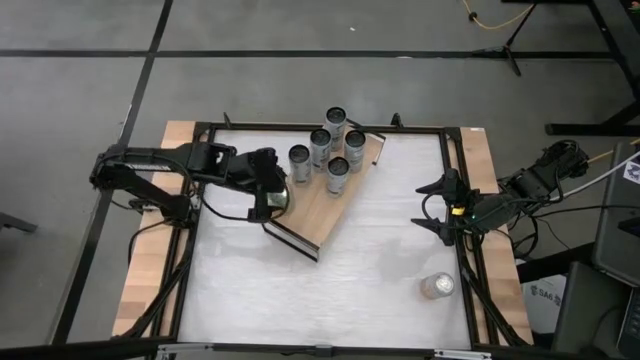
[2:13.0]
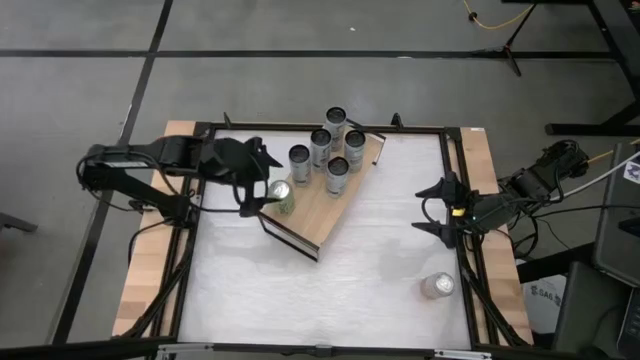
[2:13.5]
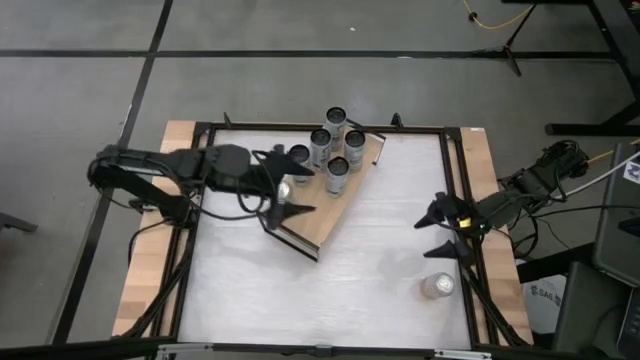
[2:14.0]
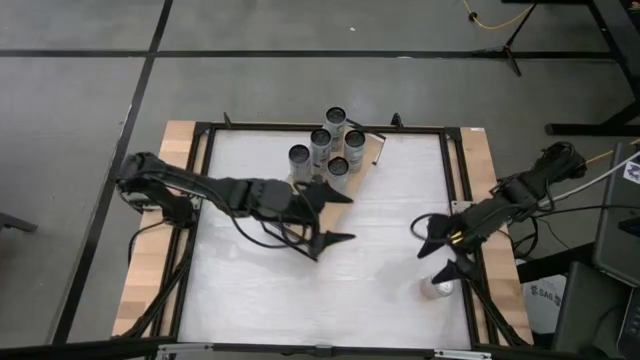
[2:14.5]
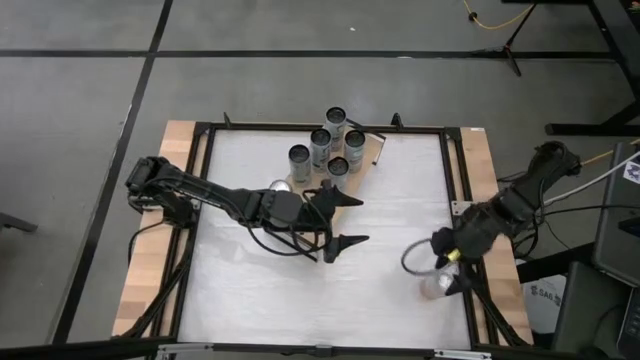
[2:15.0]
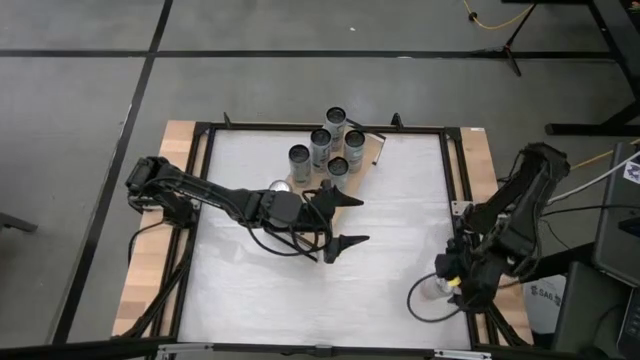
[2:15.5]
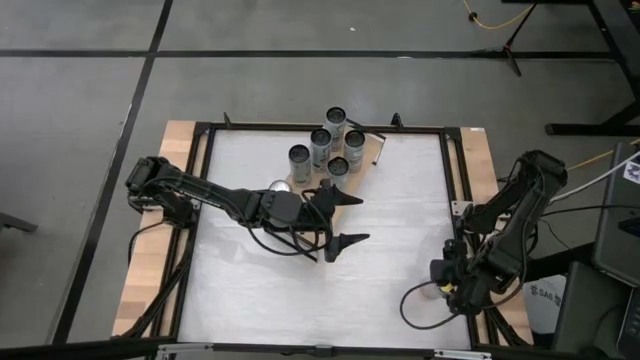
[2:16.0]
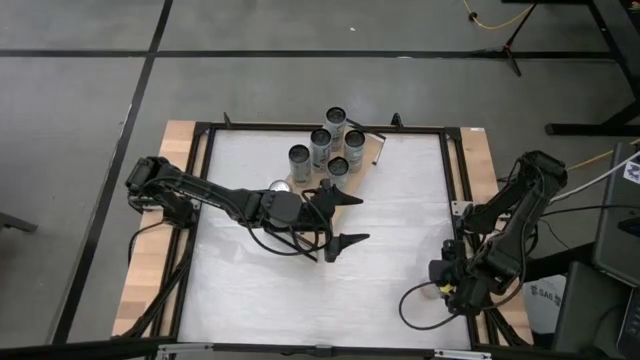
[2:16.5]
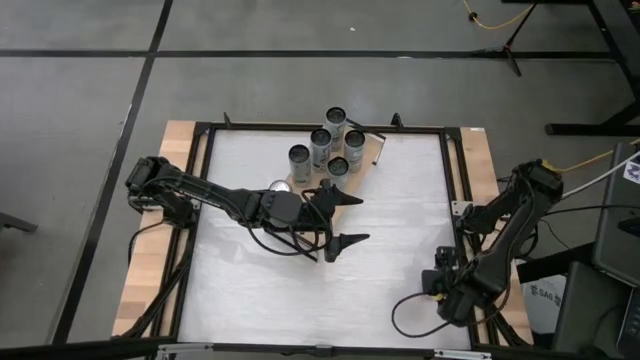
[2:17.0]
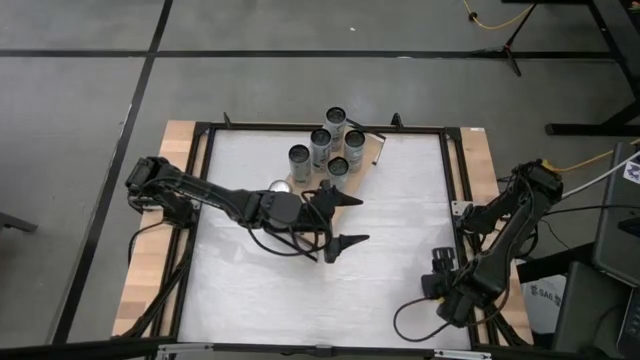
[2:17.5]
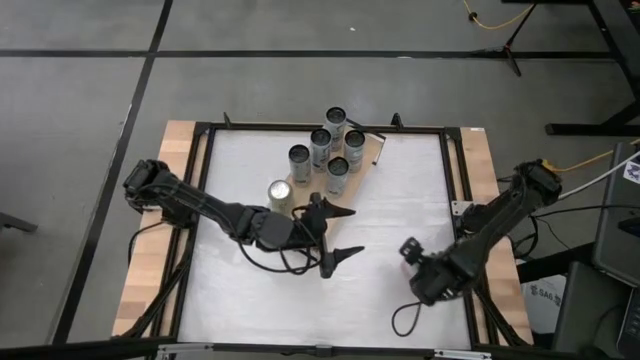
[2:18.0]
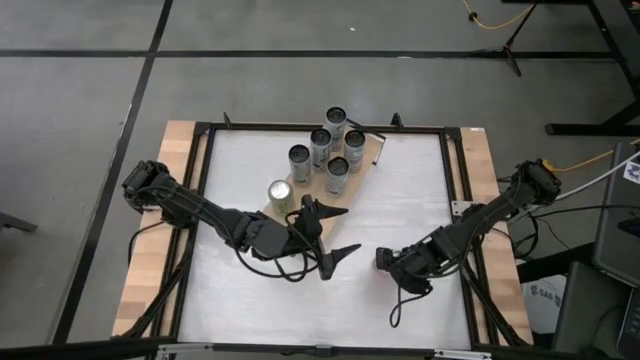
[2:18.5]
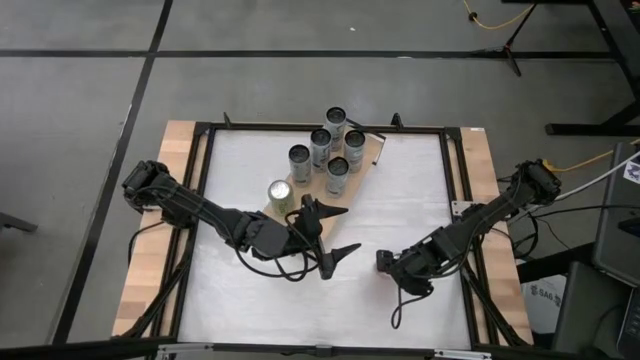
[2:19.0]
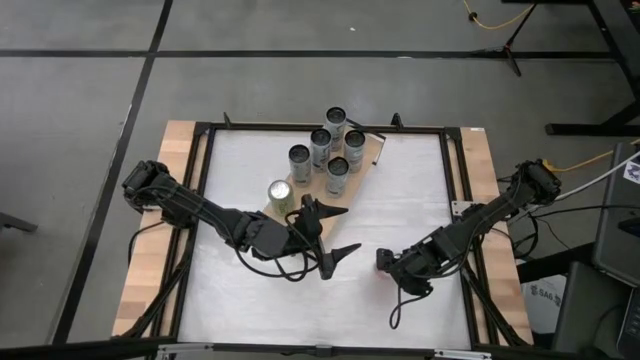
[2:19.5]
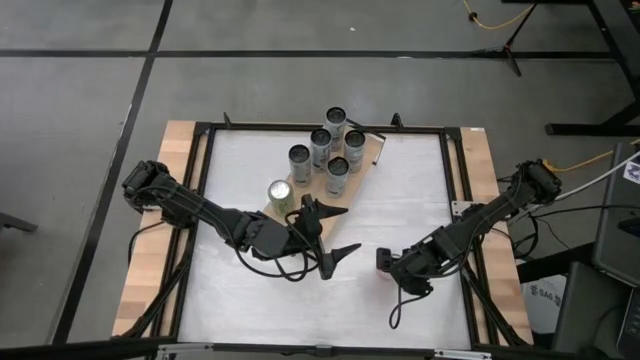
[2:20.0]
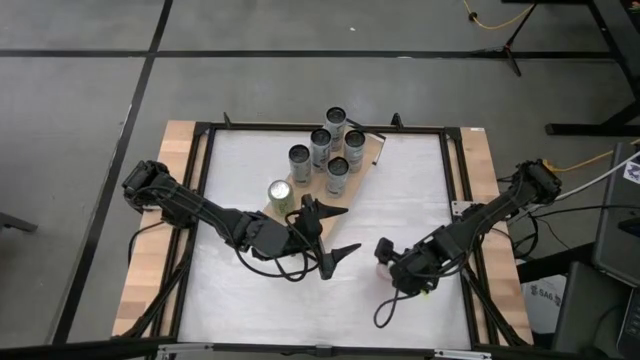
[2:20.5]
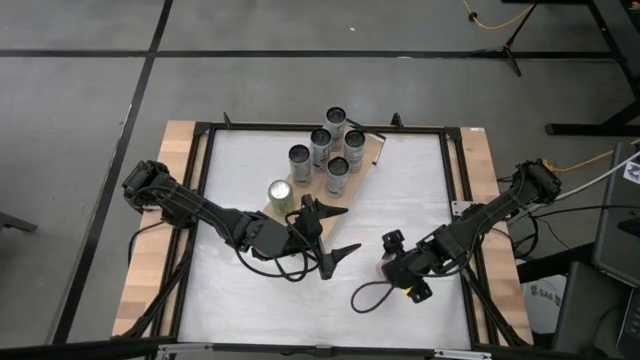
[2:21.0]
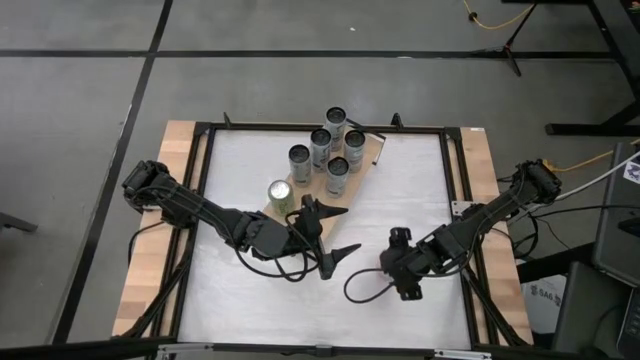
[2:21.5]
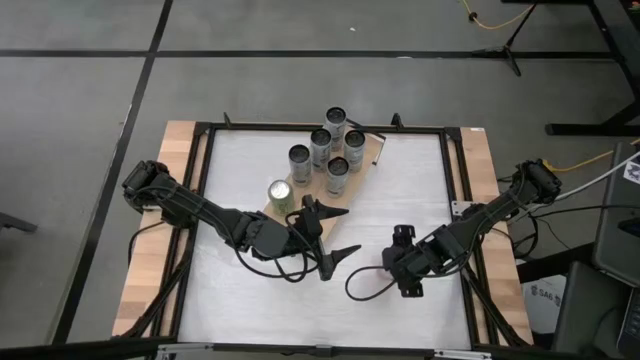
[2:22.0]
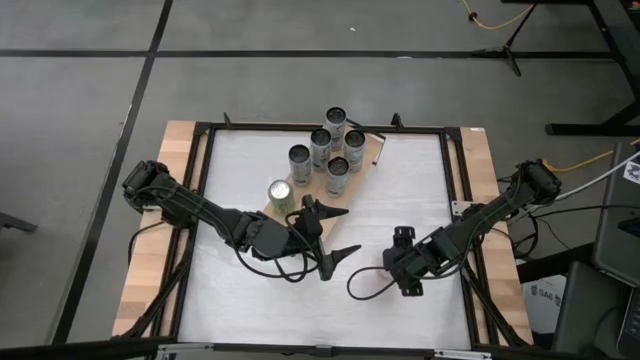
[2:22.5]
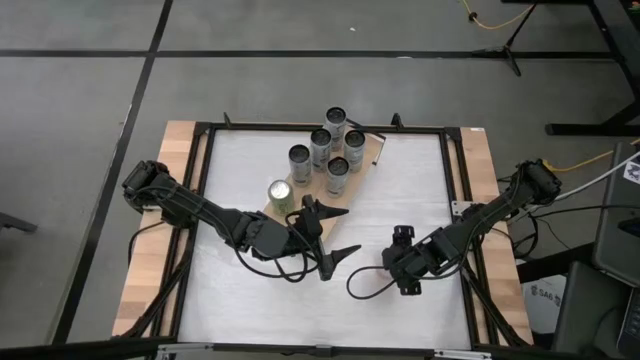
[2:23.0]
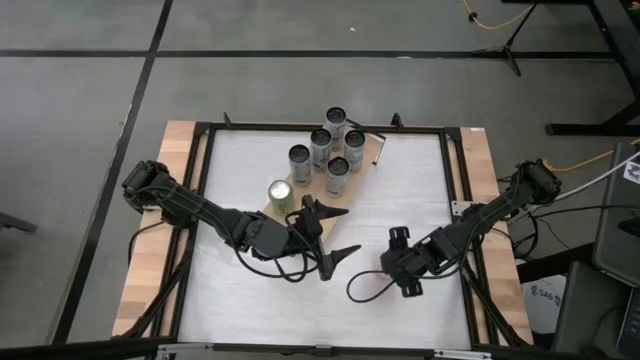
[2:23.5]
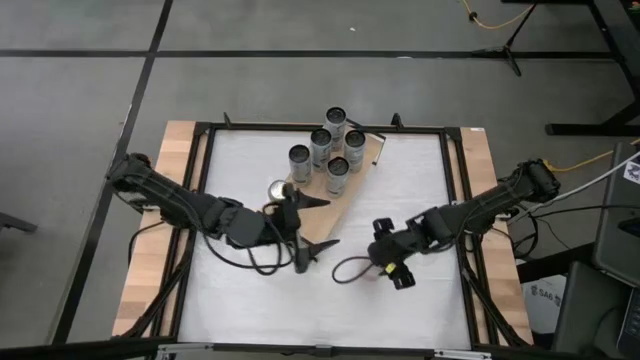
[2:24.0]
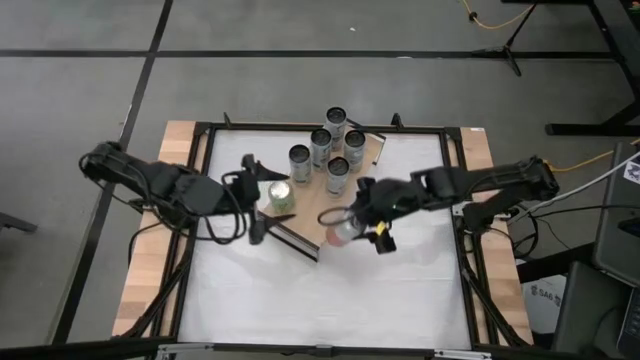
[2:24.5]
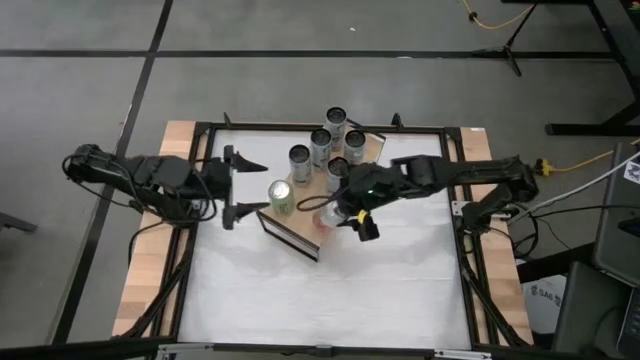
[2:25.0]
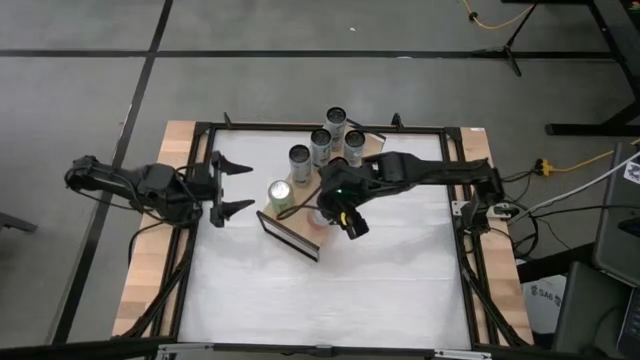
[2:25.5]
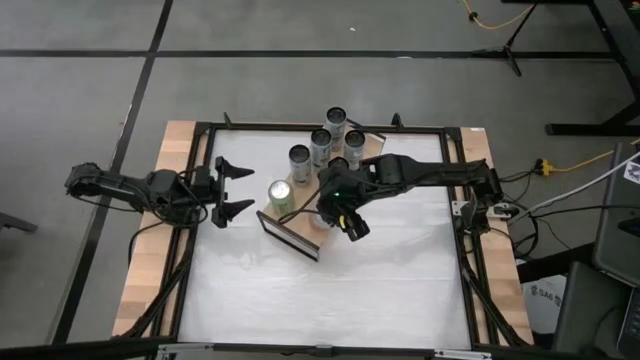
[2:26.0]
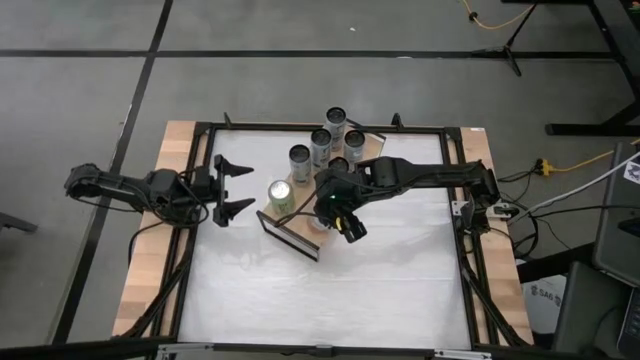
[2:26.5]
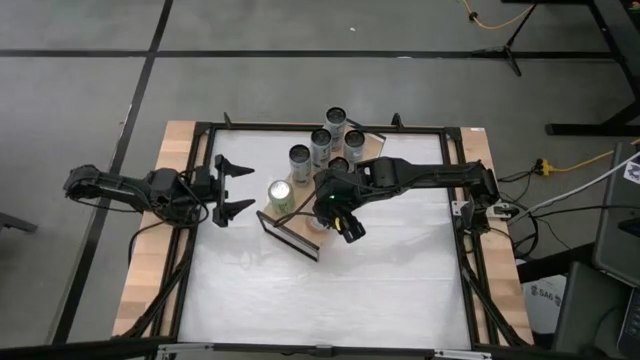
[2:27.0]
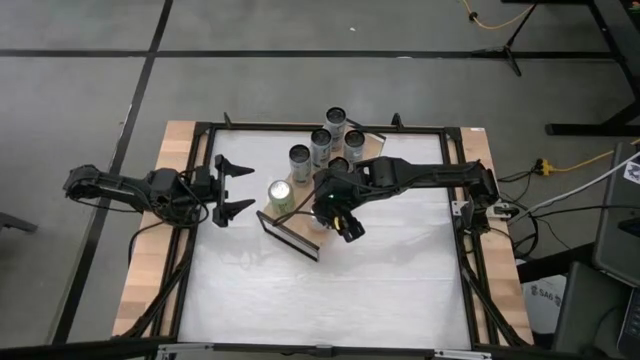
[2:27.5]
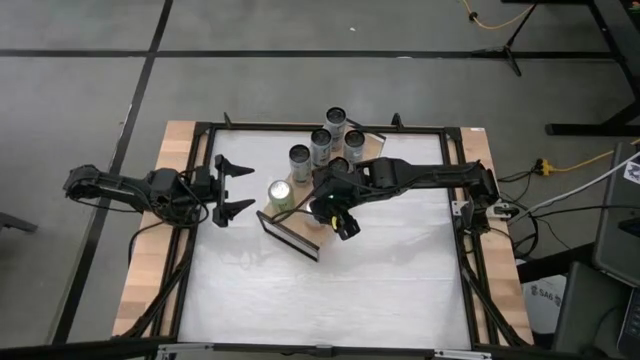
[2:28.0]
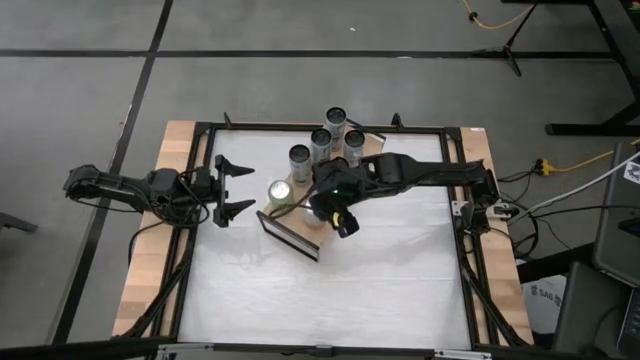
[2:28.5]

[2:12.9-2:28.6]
Task: Place canned beverage on shelf
Put the pink soda can on the shelf, aligned with the black soda can
